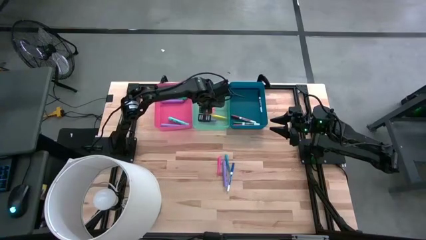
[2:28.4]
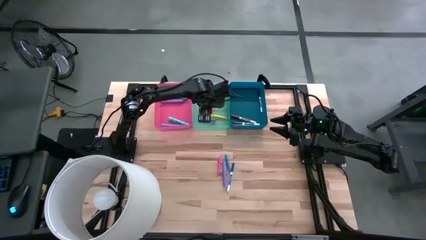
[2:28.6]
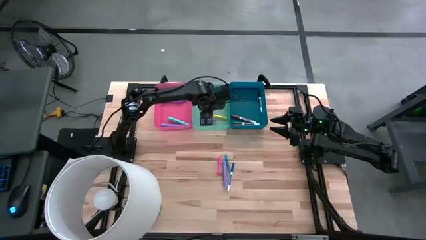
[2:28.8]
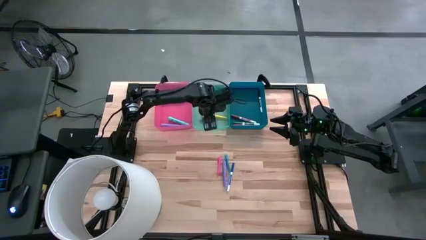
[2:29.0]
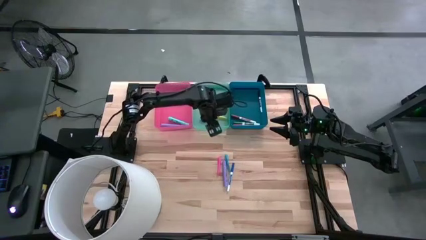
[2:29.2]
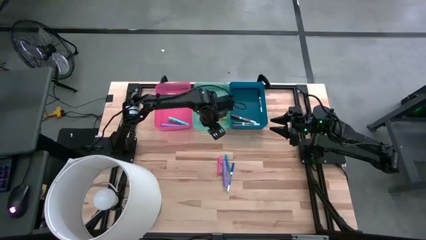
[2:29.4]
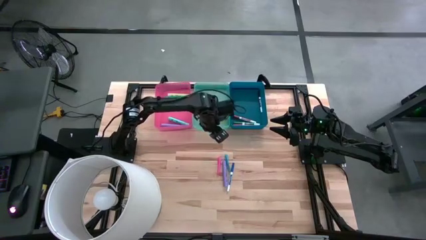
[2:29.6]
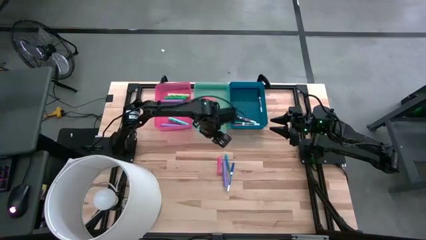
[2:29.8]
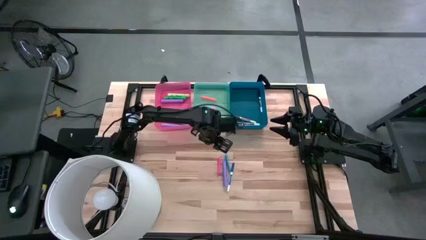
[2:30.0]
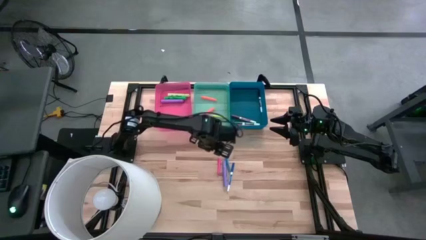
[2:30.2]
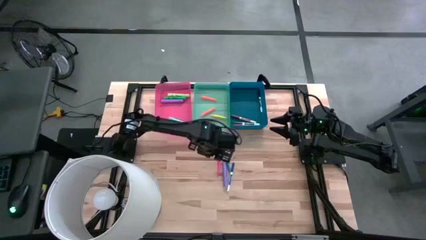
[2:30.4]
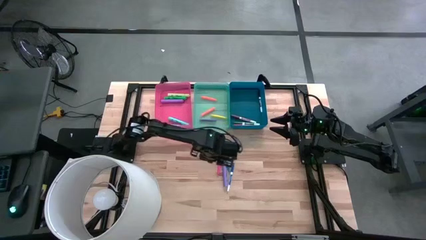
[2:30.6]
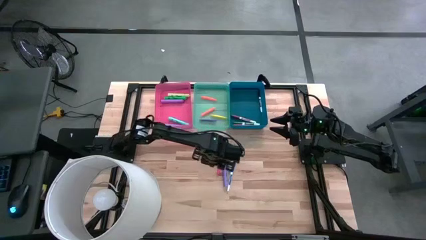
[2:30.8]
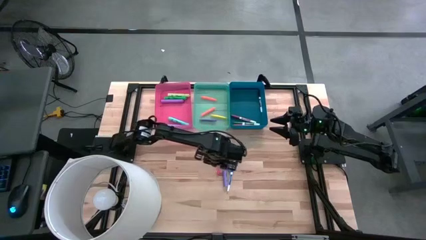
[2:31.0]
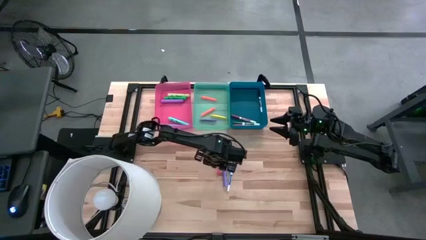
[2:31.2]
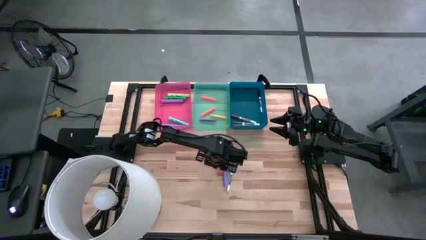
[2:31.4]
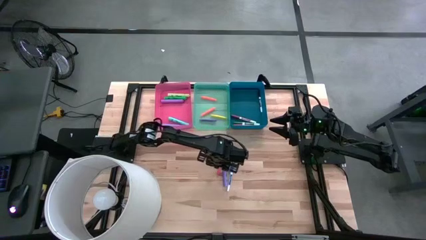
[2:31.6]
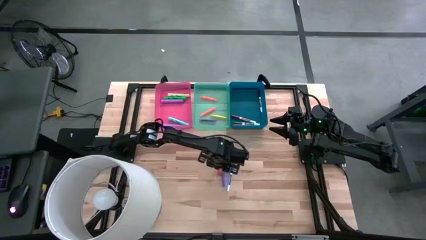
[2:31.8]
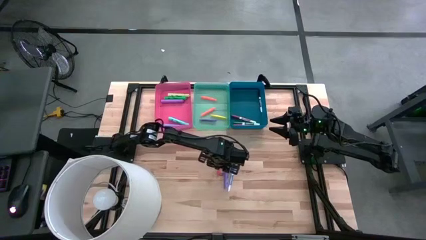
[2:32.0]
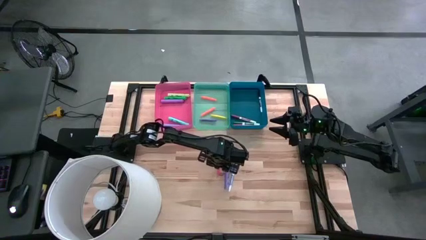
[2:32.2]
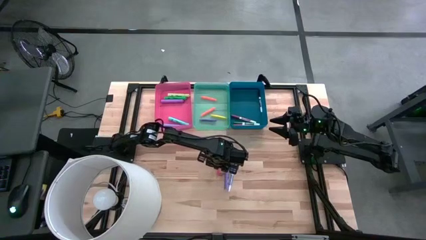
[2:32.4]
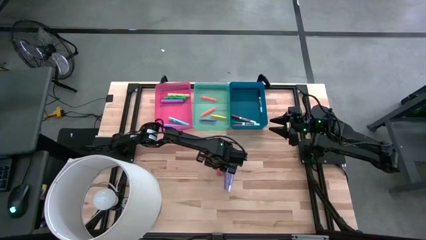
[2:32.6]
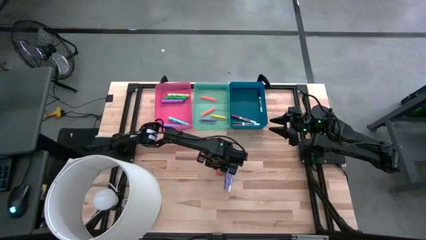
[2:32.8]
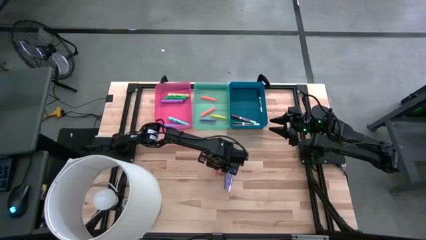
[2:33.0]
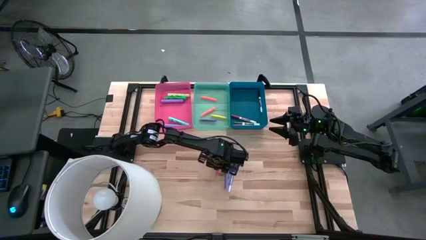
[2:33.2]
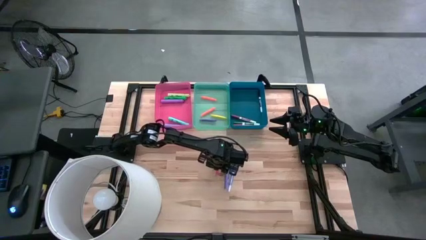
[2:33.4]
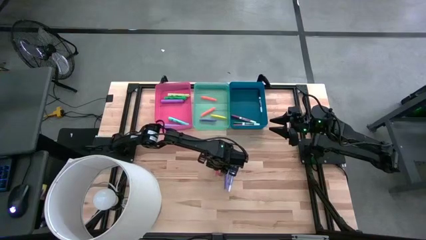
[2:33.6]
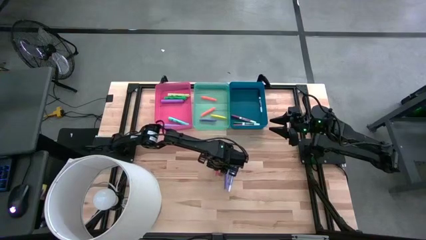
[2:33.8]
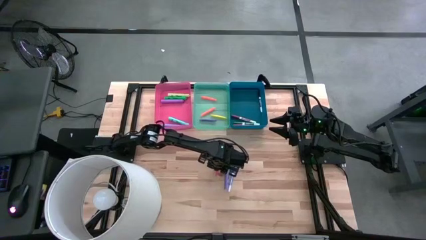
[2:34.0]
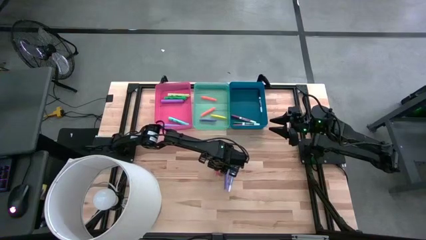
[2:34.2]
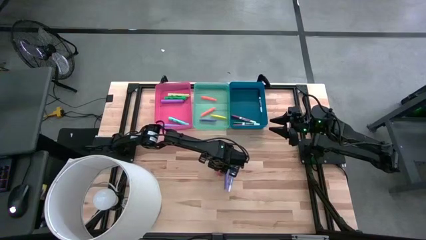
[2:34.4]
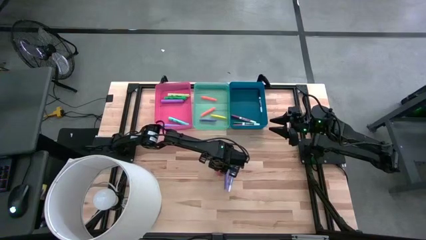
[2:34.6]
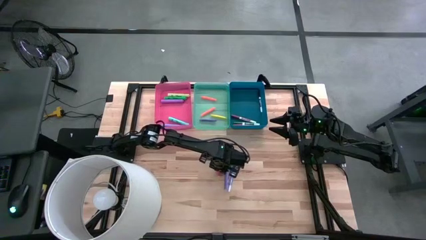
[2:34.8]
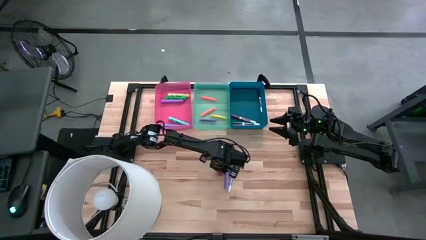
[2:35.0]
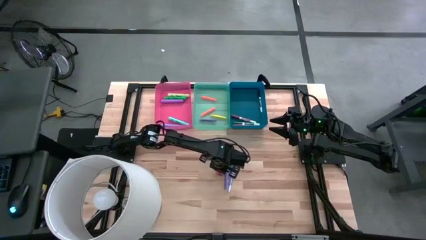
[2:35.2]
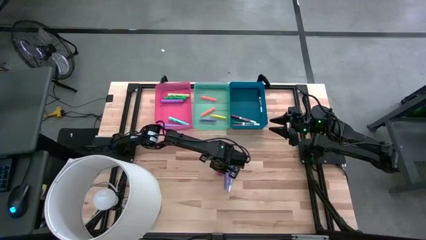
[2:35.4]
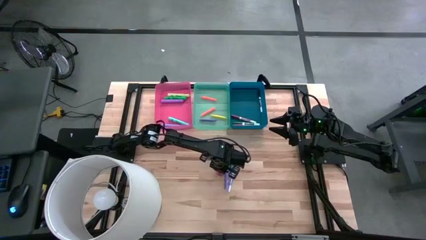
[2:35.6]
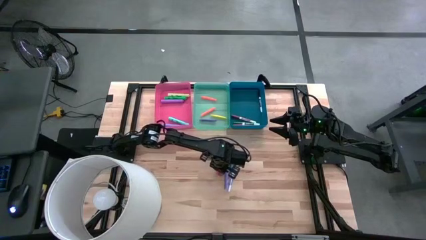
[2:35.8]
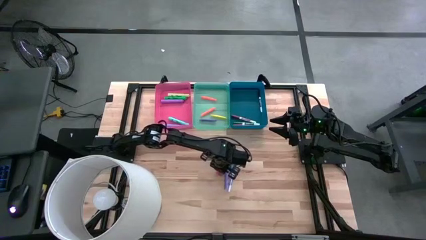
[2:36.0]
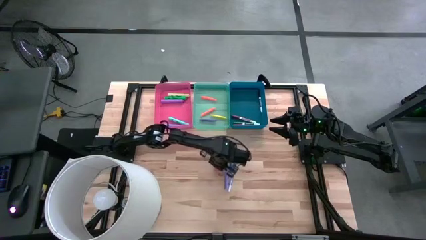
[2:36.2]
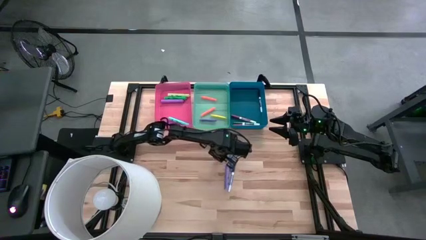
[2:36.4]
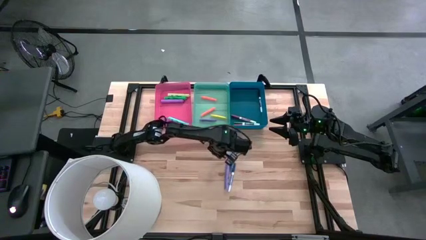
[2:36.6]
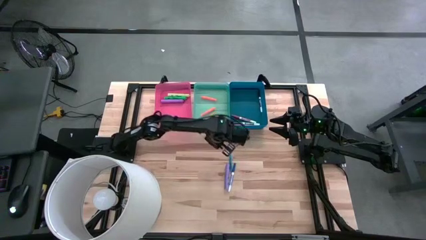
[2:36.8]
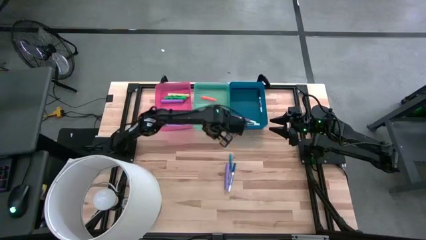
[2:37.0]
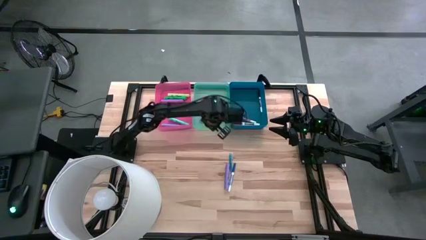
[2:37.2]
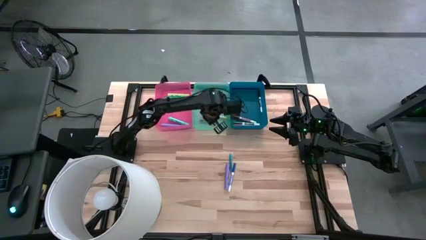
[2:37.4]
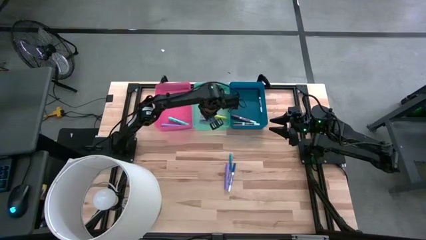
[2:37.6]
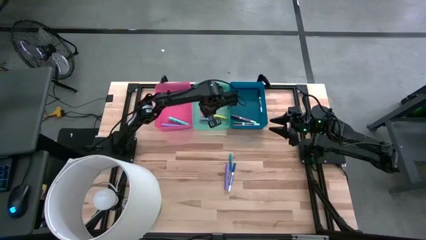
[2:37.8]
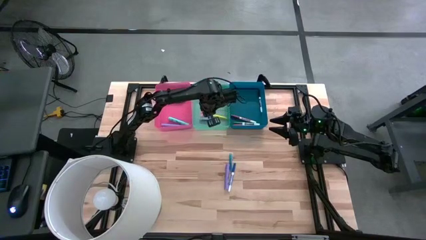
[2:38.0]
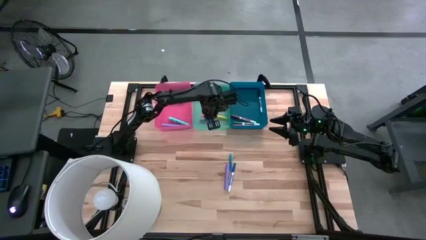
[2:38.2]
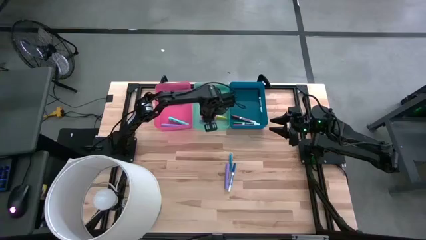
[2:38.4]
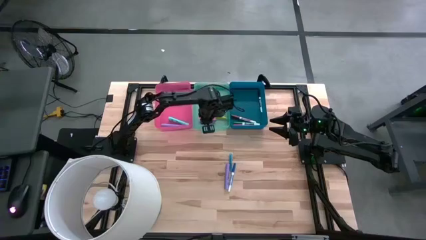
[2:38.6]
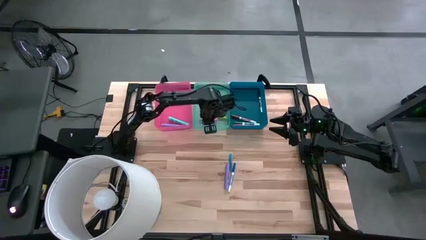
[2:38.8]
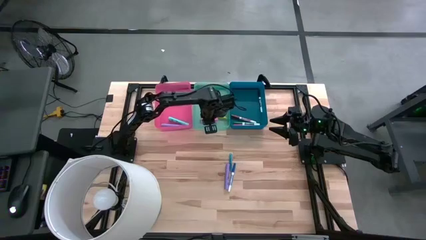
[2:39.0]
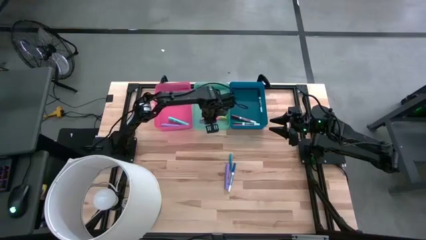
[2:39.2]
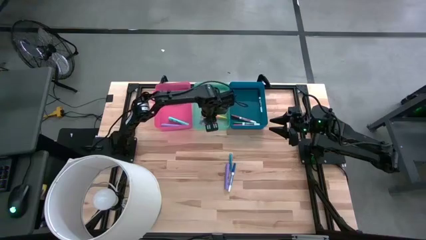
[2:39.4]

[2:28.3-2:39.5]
Task: Pick & Place Markers
Put the pink pen into the green bin

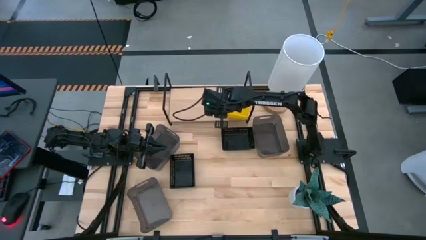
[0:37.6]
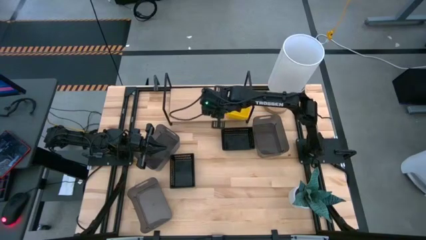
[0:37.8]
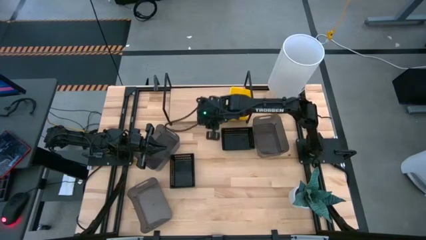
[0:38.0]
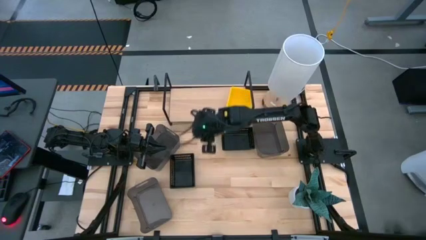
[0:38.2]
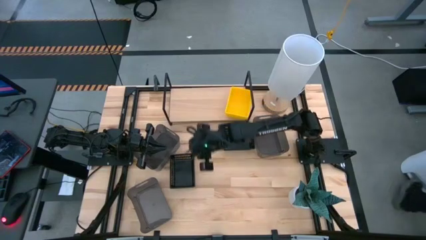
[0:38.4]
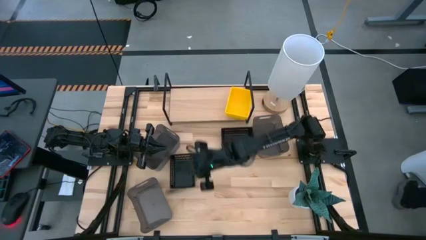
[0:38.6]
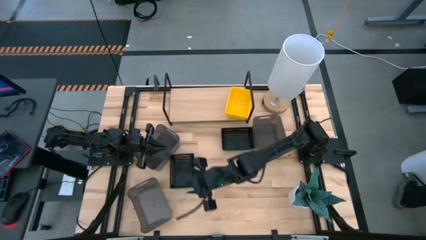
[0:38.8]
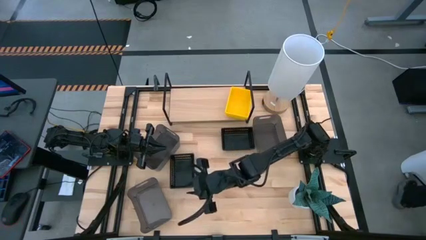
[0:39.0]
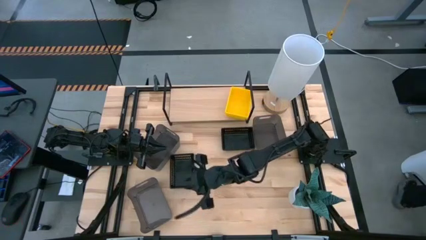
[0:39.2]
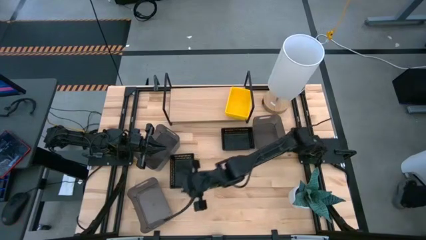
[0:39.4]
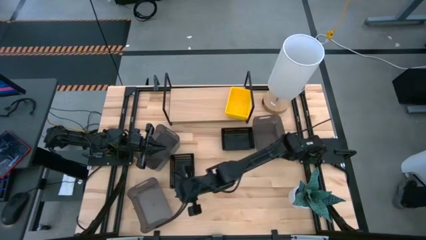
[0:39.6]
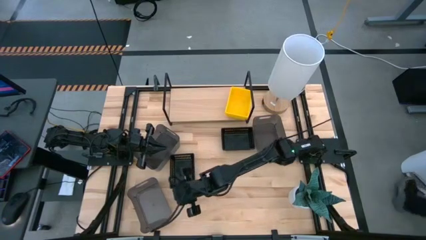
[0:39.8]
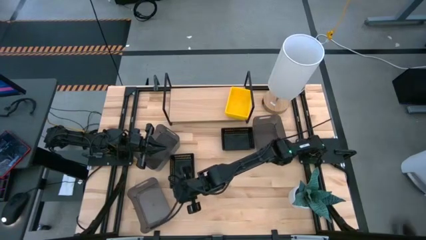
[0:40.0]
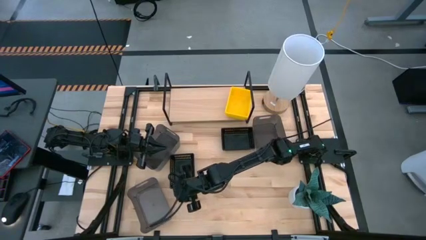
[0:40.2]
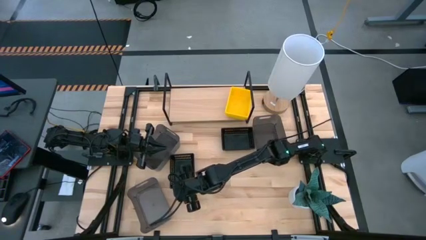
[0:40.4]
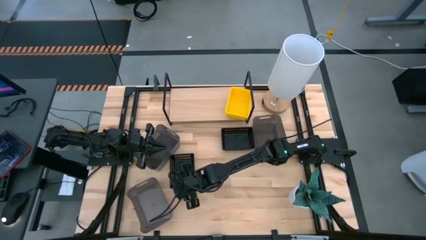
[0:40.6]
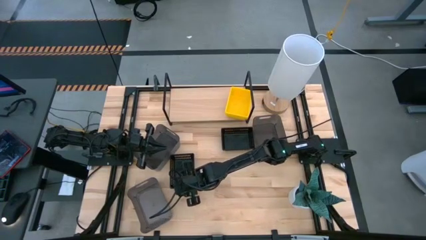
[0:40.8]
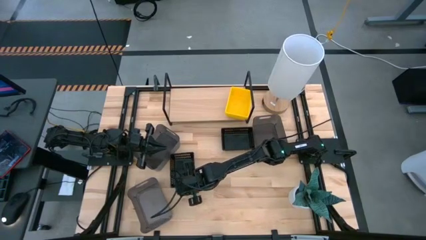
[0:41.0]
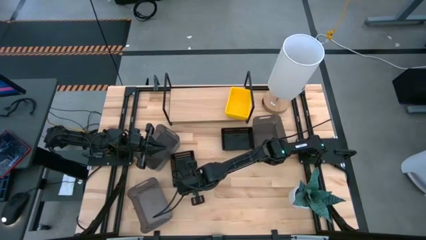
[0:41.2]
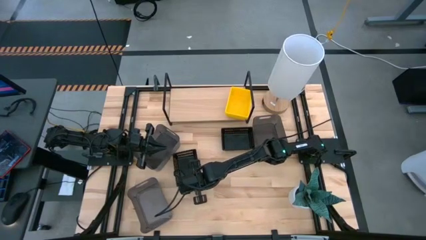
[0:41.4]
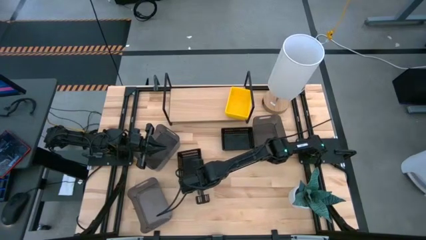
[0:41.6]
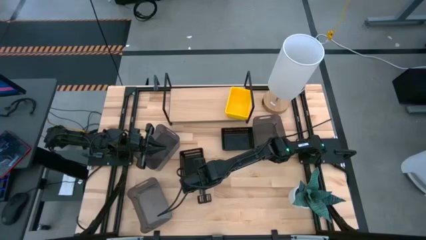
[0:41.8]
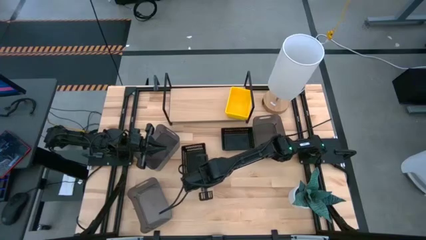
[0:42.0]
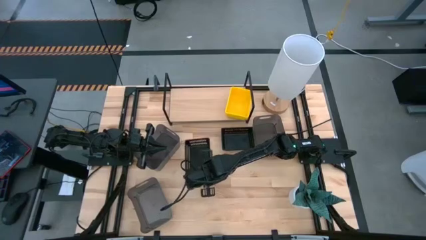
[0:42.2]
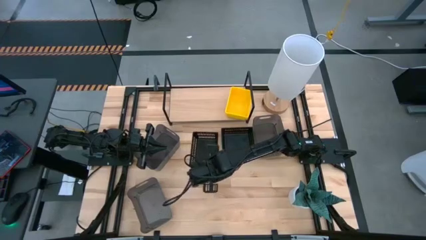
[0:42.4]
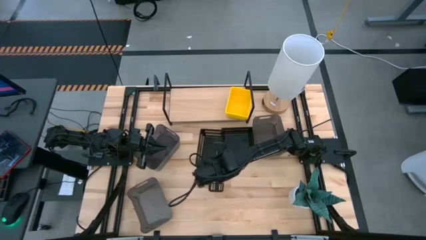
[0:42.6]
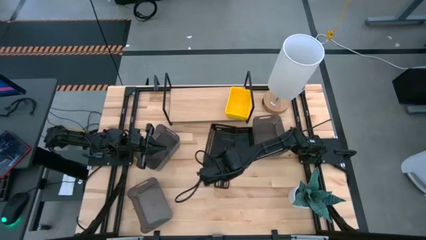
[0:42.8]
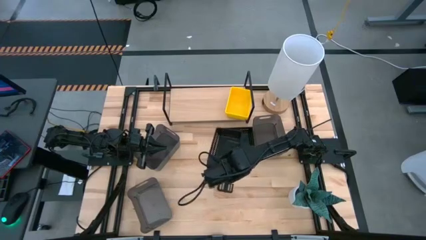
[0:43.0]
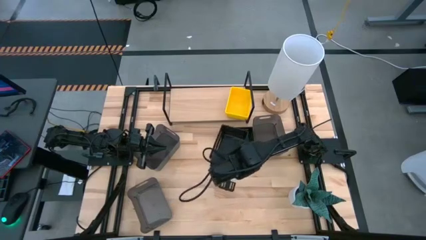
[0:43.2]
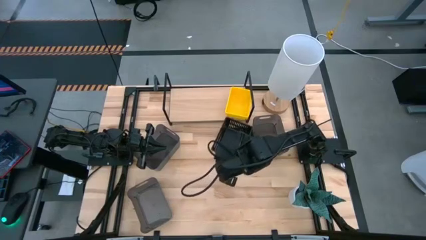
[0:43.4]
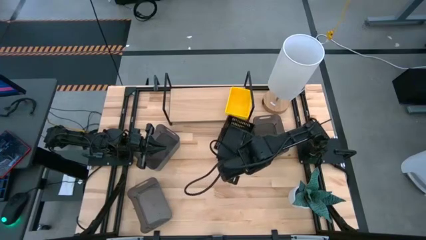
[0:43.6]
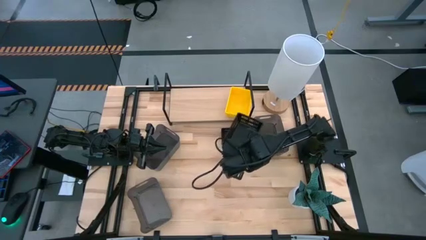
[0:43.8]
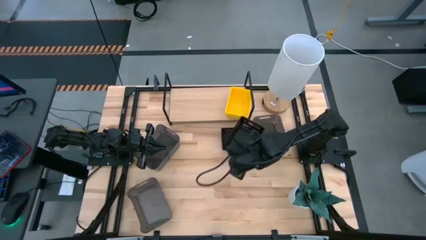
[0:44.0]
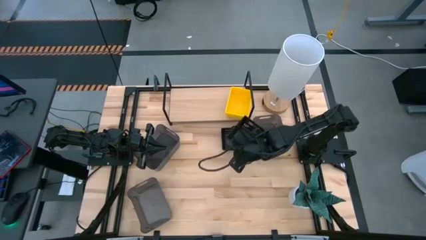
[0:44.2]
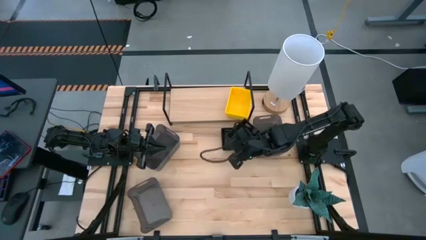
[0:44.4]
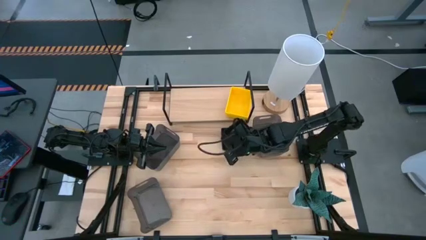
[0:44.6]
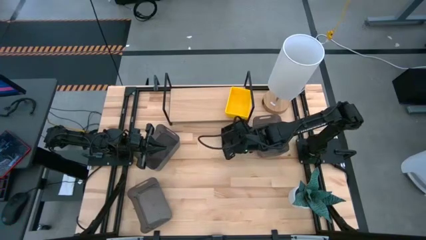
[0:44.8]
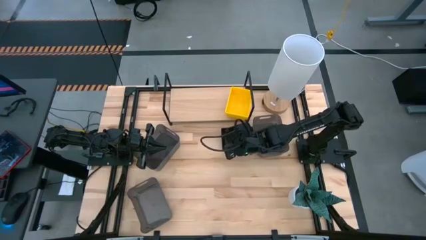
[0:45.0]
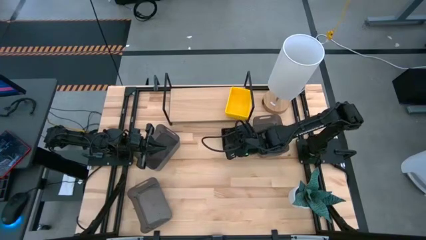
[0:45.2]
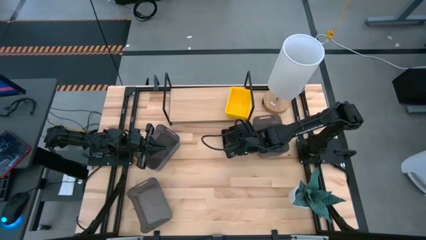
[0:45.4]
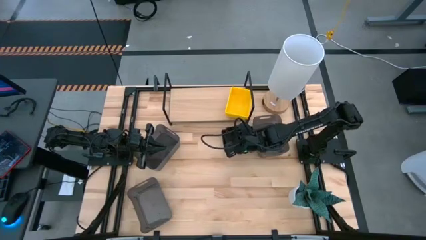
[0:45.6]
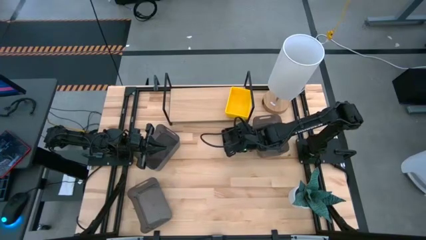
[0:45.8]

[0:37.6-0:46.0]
Task: Stack baskets on shelf by color
Stack the left black bin on top of the black bin
